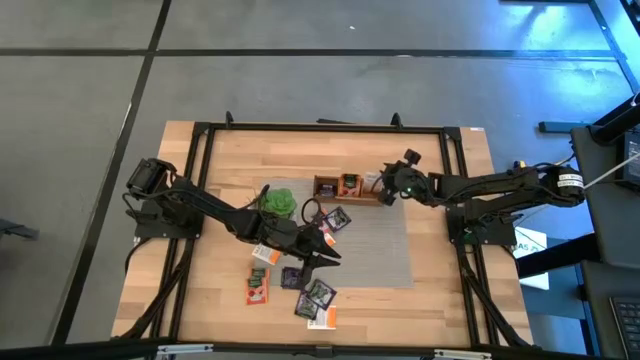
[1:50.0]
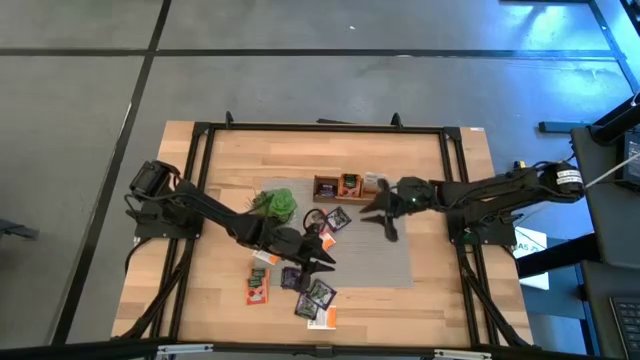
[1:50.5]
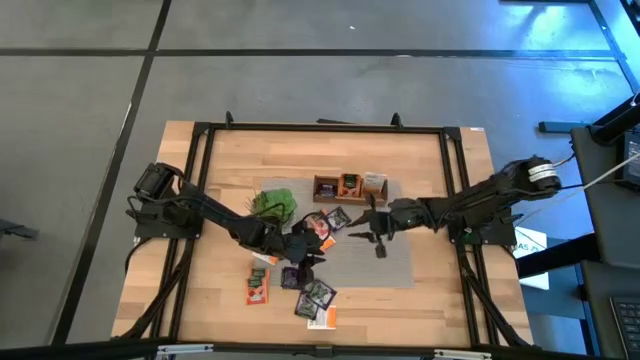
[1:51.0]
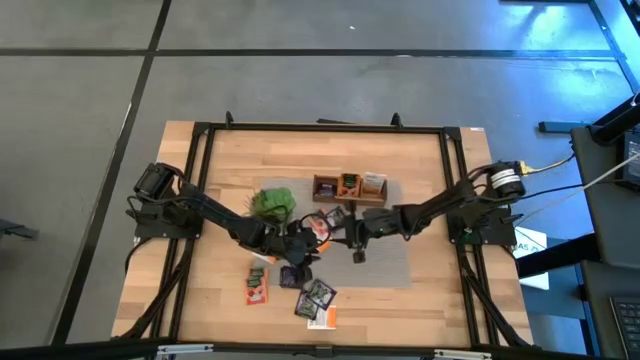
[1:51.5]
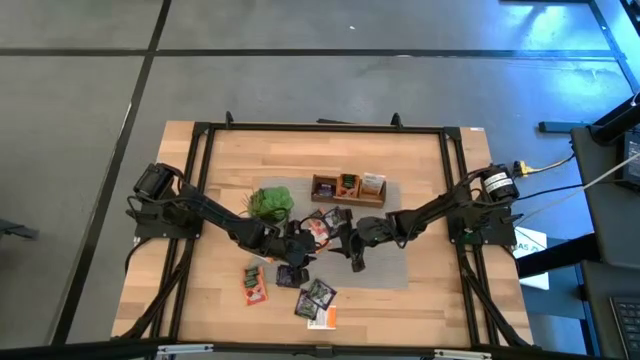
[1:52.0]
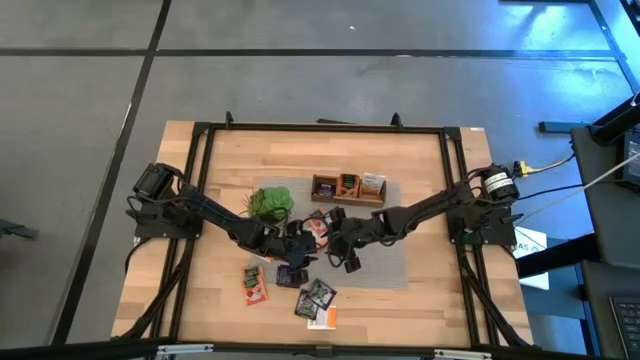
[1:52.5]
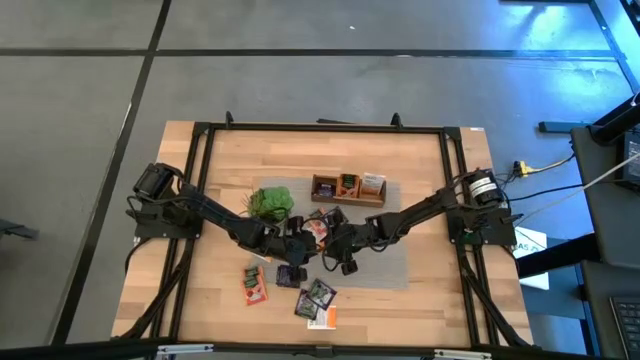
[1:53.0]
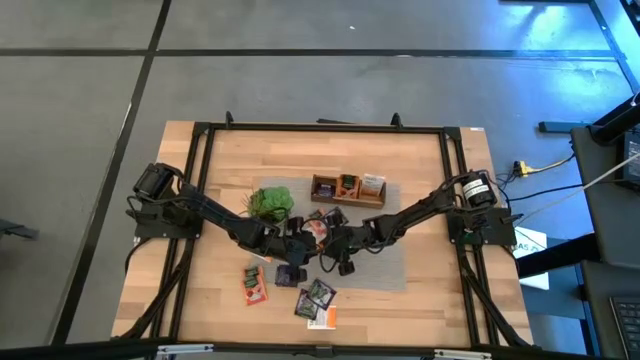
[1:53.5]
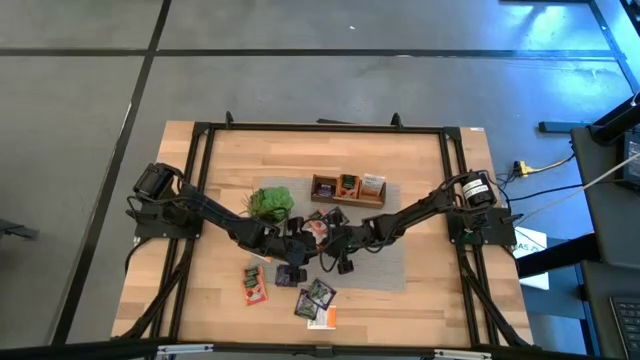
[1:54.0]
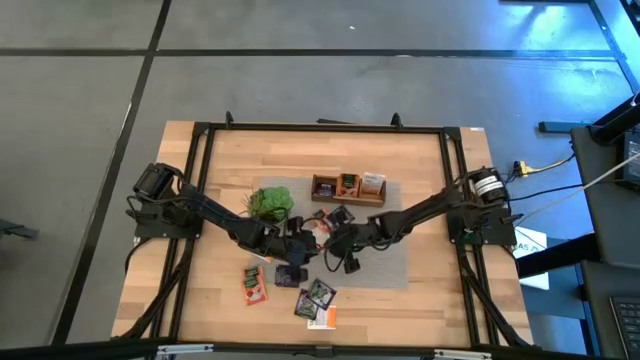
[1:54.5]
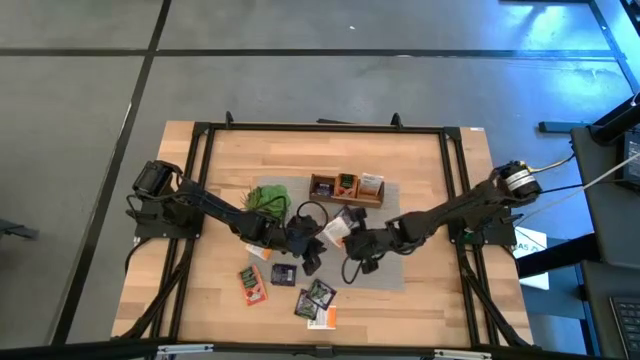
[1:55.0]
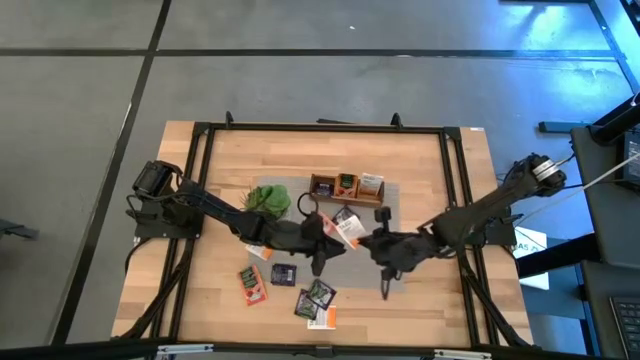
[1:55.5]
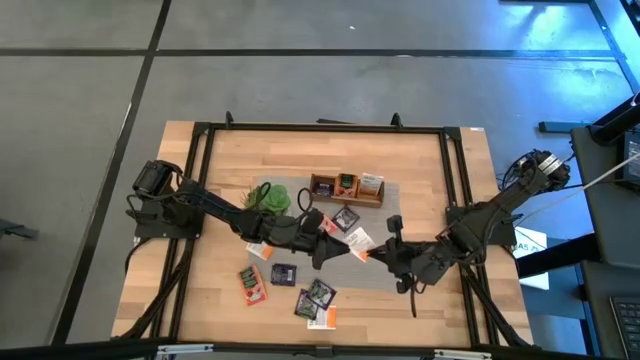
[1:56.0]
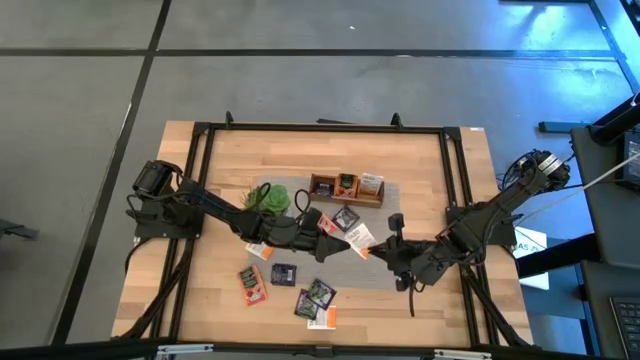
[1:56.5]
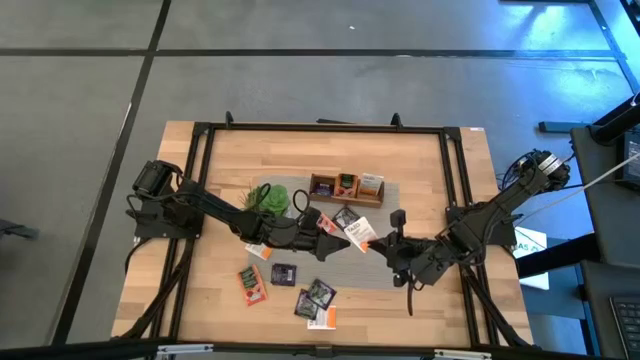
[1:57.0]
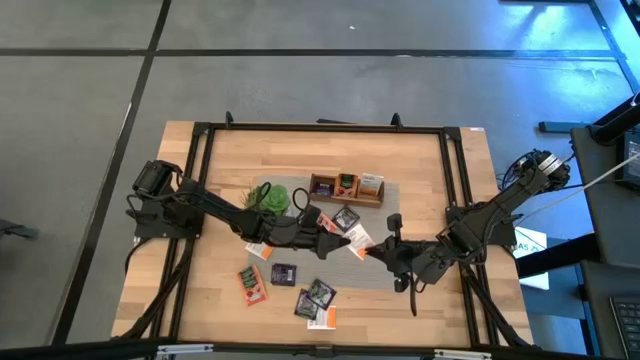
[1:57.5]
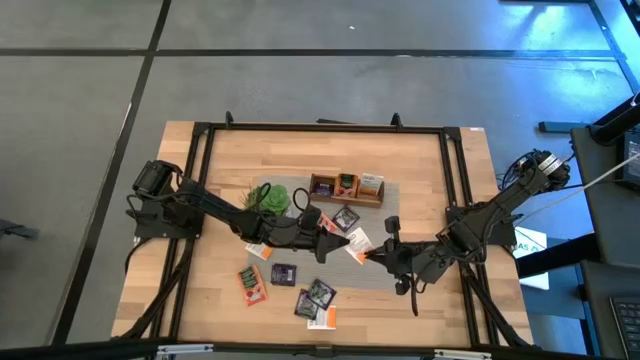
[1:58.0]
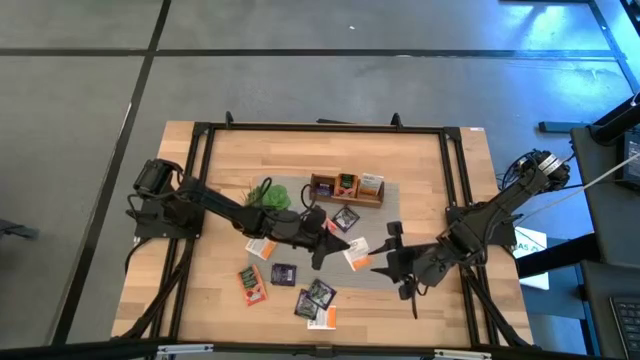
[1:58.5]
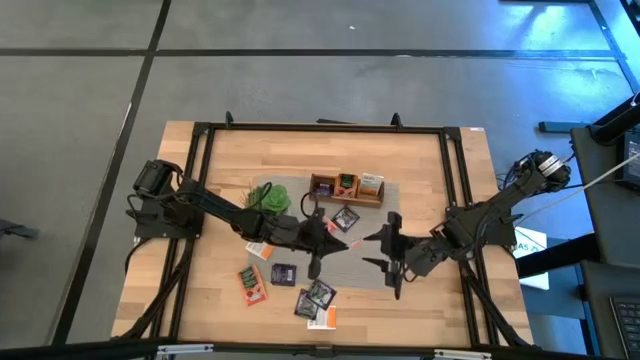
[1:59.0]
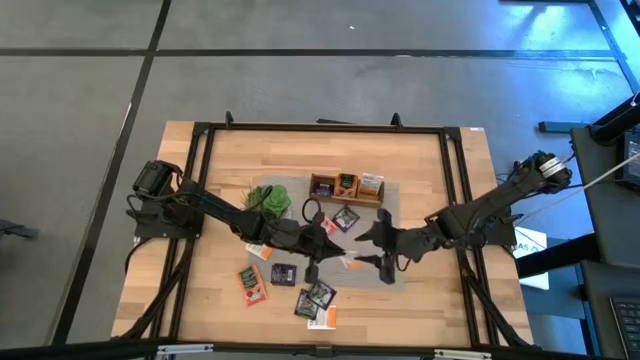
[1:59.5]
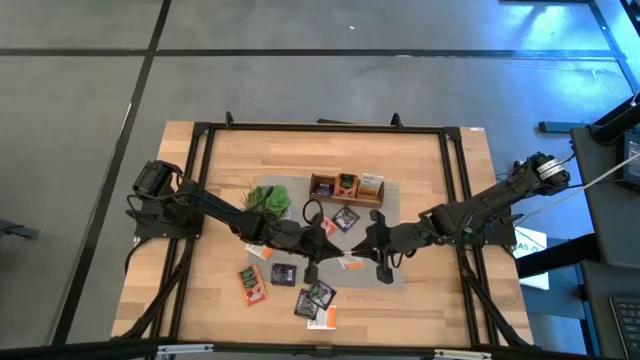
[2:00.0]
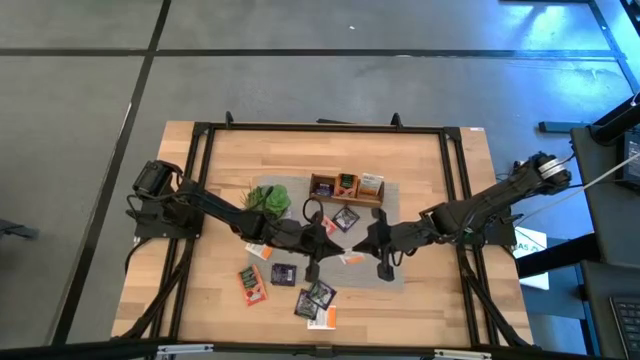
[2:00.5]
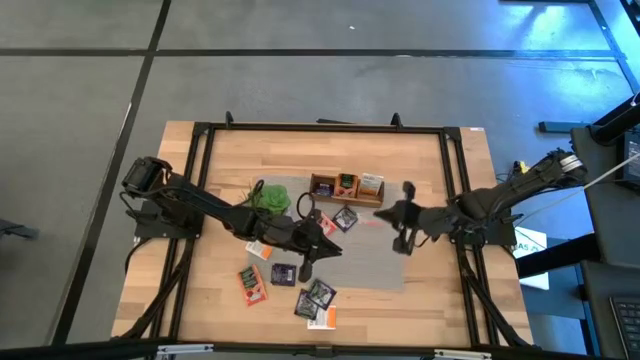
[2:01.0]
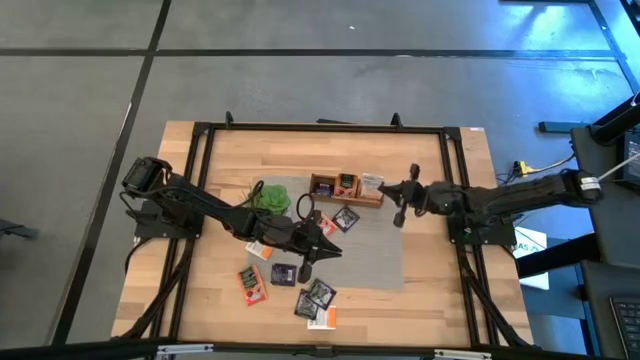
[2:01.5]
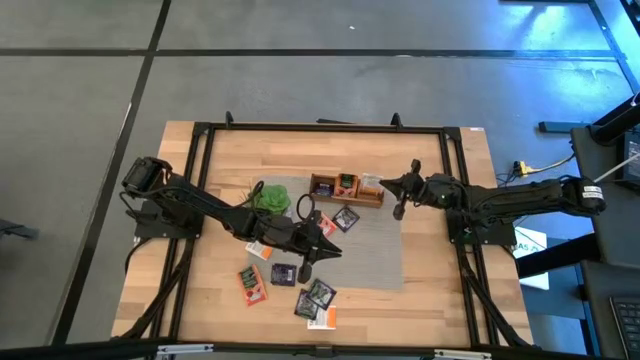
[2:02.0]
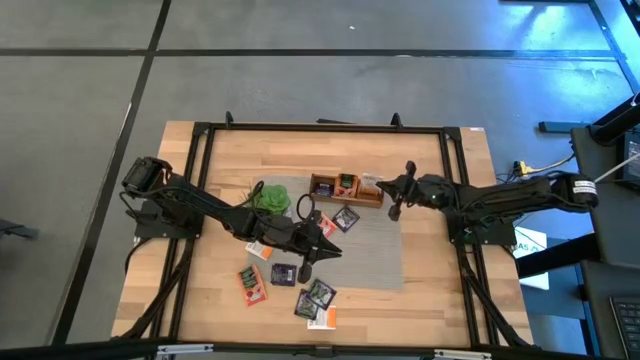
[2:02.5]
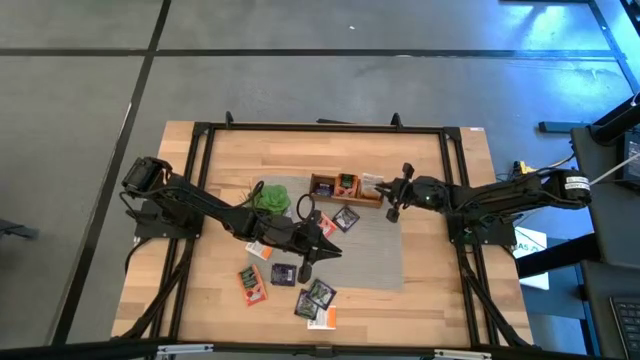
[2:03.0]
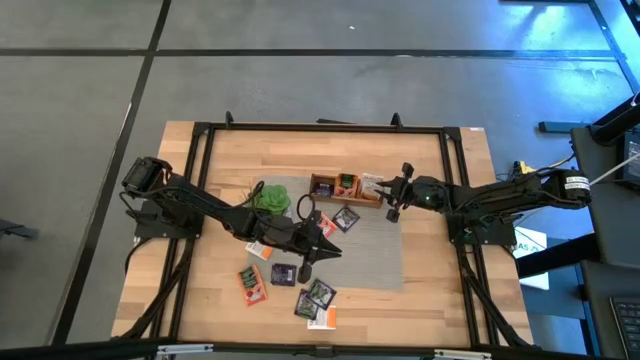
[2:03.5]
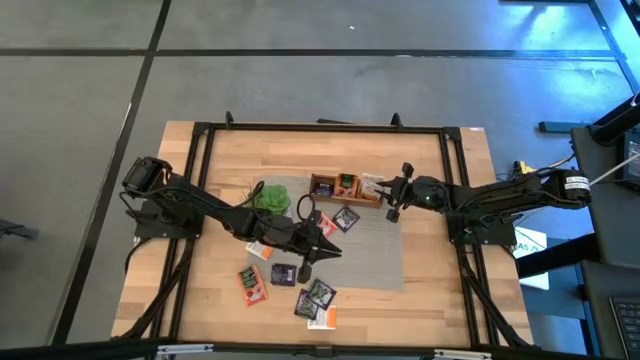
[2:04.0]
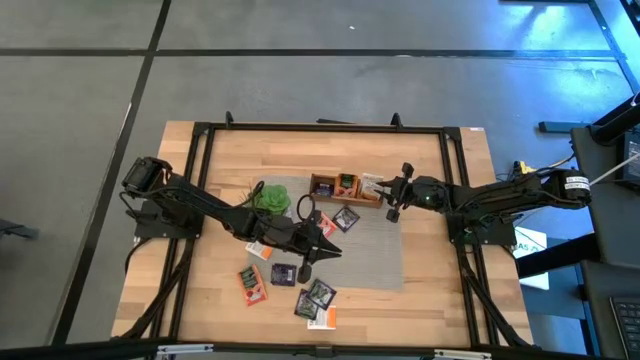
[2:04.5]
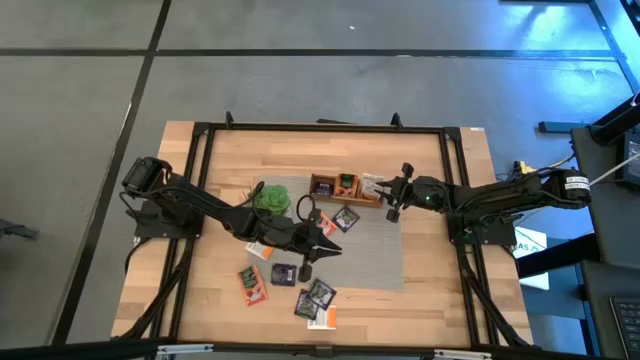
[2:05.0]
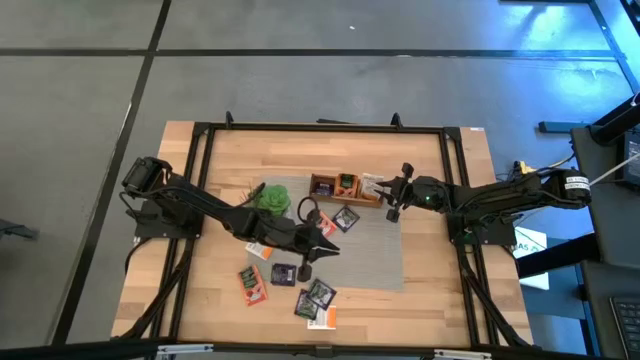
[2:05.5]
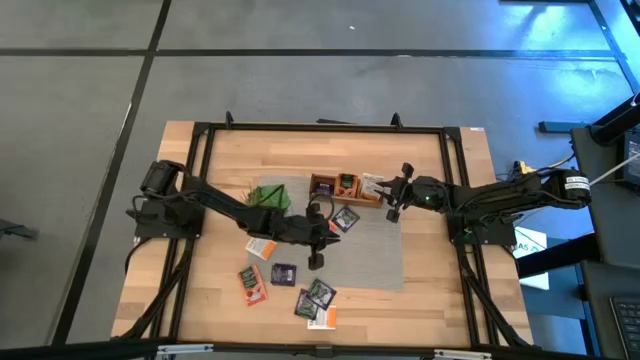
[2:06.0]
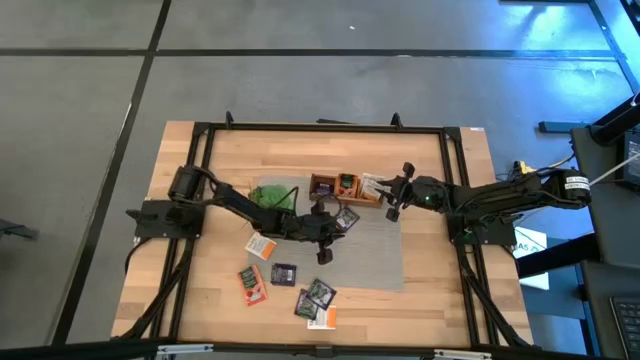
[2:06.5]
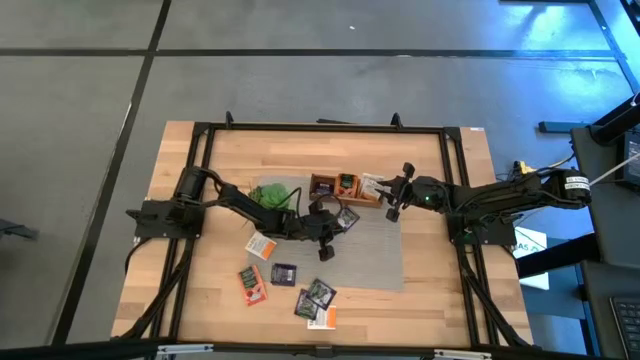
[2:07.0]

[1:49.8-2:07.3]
Task: Pick & Place Tea
Put the white tea bag into the right section of the wooden organizer

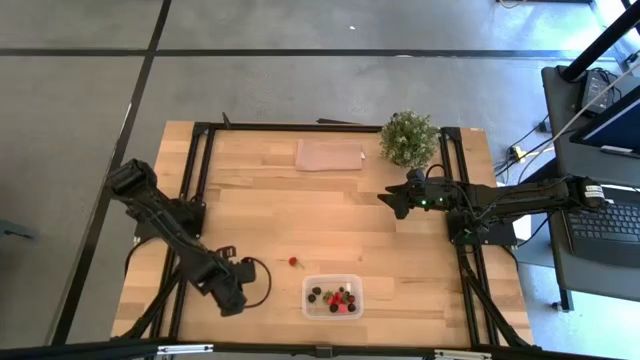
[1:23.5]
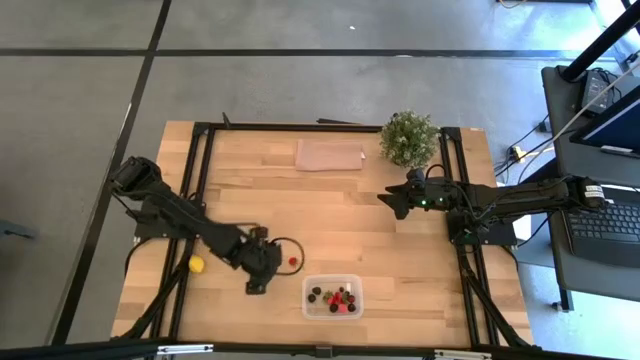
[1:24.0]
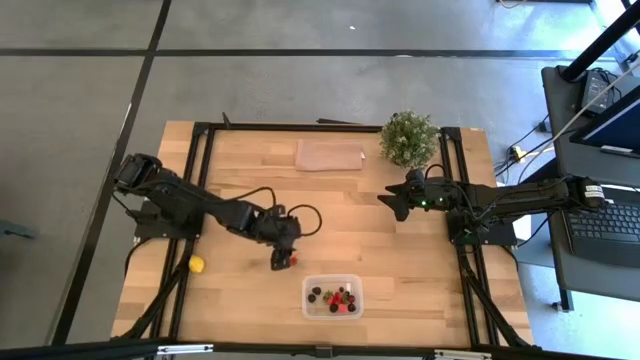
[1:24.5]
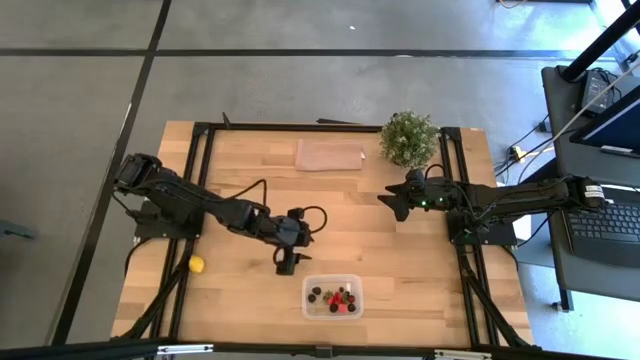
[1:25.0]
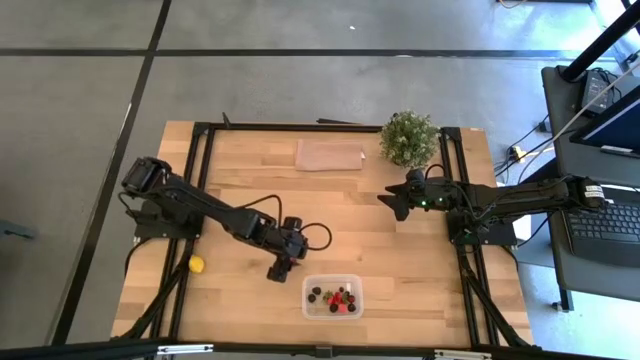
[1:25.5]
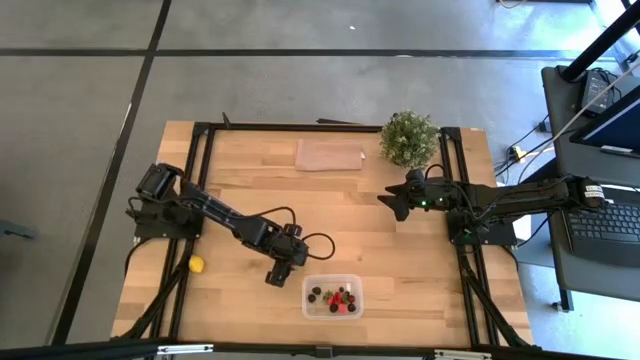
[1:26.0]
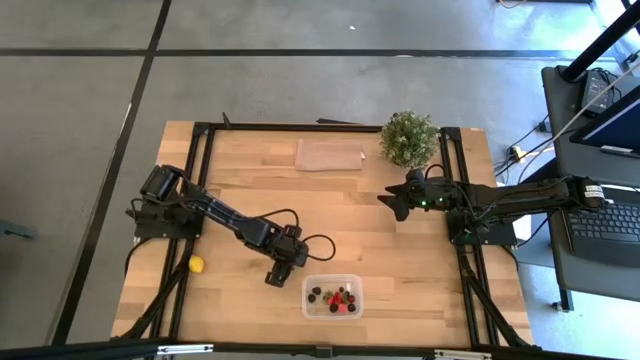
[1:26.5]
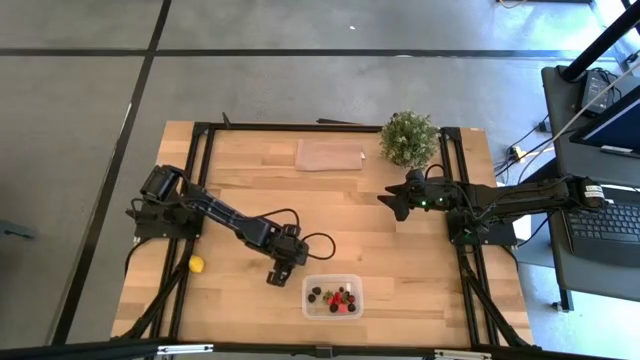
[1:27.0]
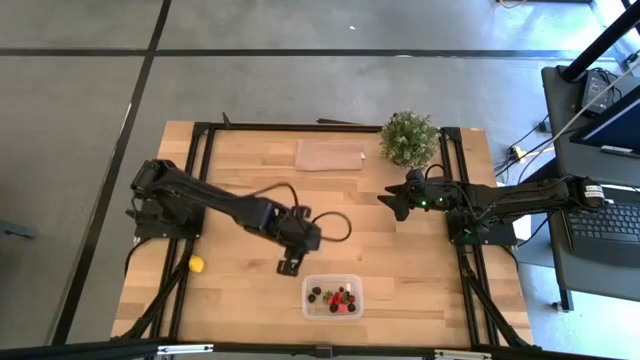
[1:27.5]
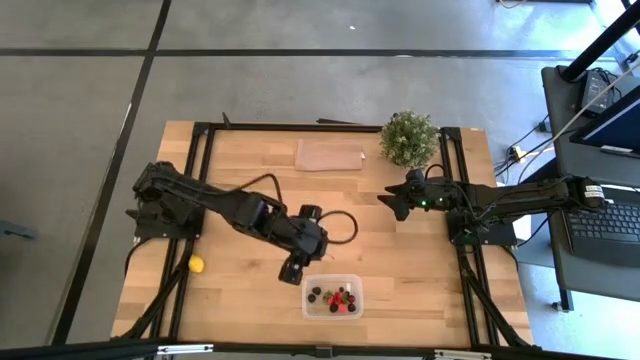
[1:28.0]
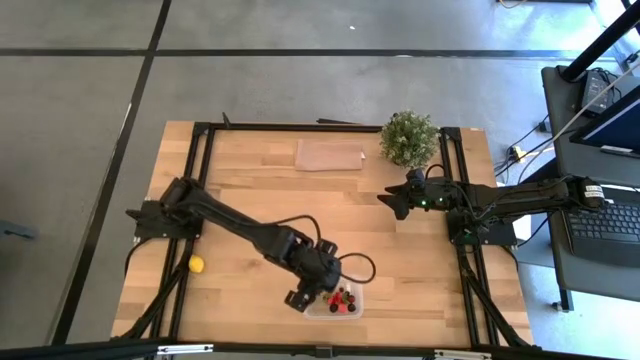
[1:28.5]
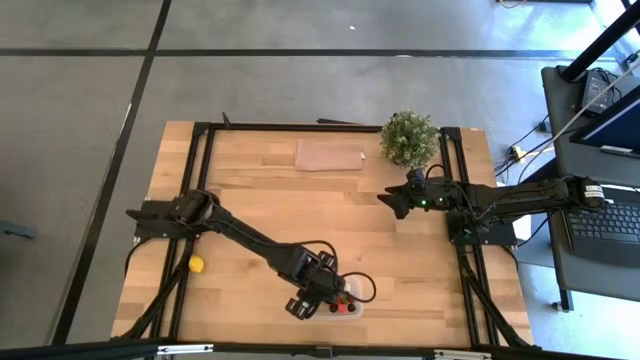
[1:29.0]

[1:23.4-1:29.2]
Task: Pick and placing Produce into tupperware
Put the strawberry into the transparent container
